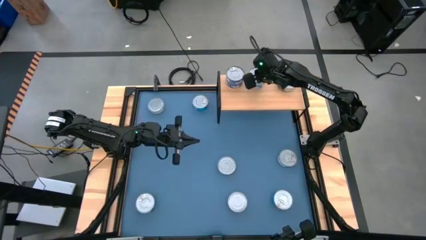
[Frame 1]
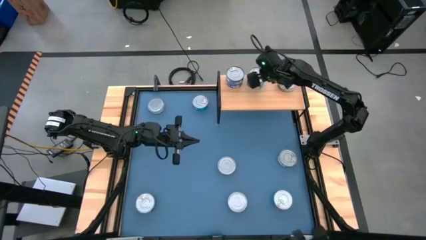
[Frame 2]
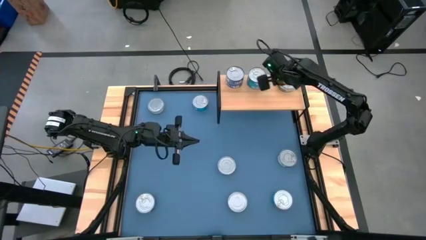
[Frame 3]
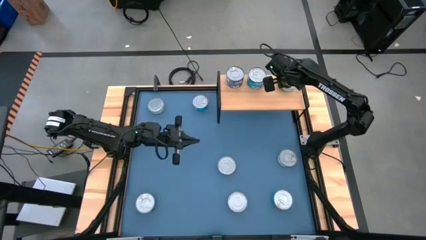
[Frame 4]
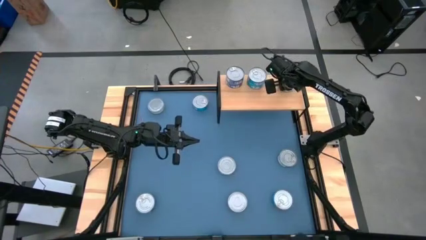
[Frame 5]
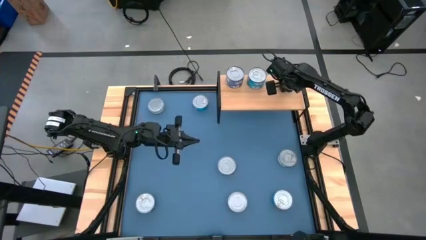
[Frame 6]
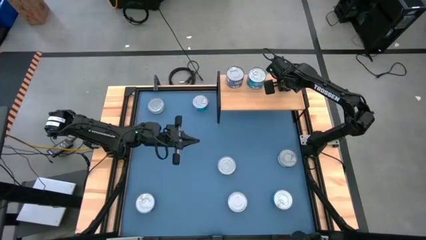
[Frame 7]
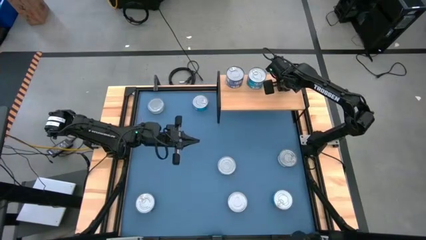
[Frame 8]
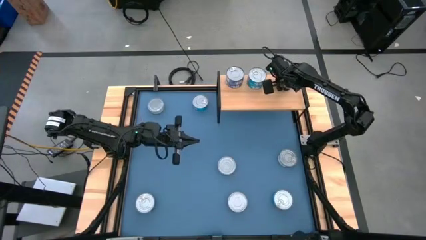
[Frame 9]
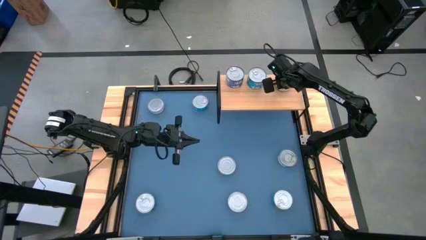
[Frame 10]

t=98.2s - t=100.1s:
Task: Stack canned seafood by type on shelf
Adjust the green tuna can on the shelf

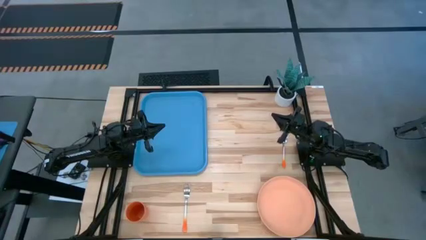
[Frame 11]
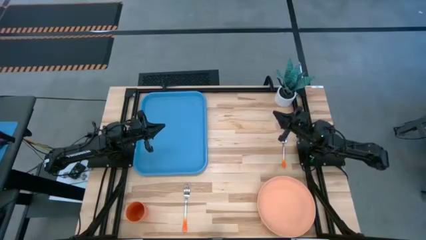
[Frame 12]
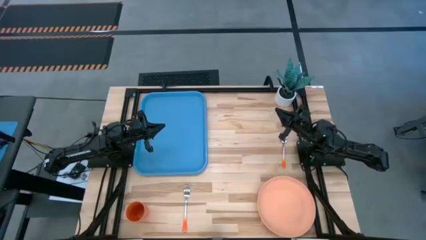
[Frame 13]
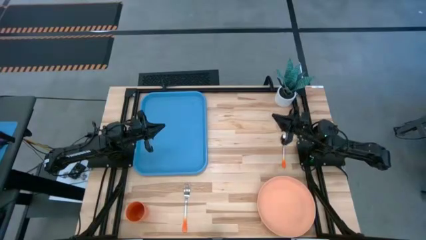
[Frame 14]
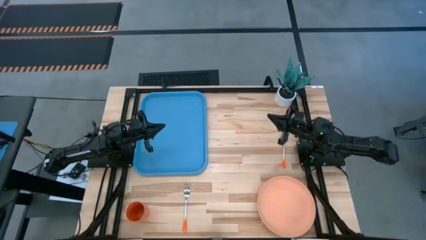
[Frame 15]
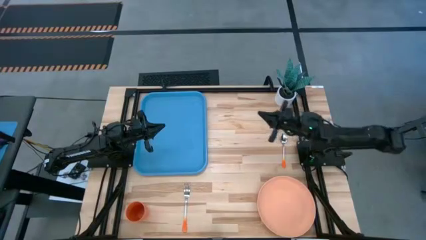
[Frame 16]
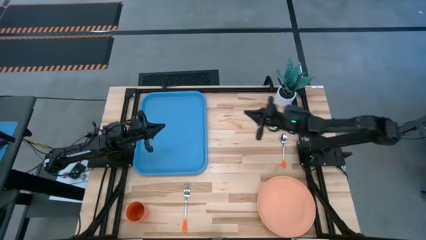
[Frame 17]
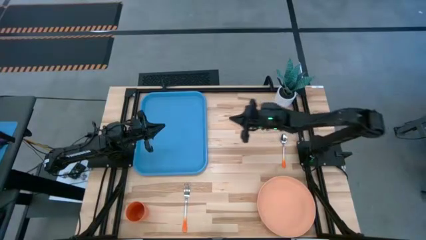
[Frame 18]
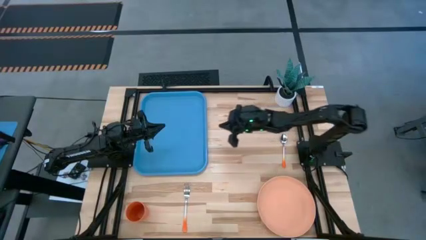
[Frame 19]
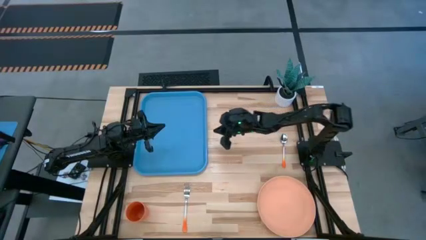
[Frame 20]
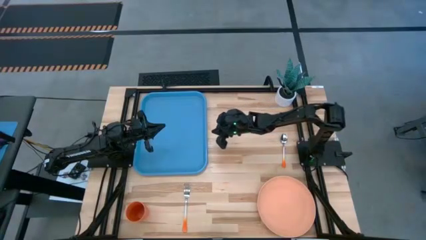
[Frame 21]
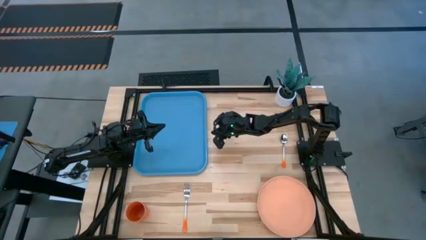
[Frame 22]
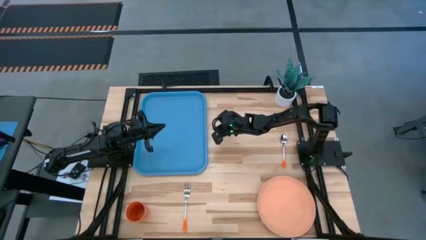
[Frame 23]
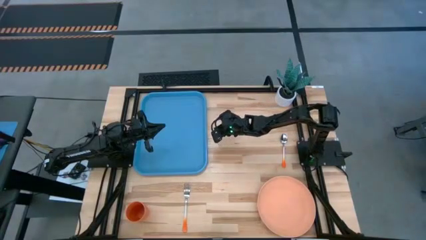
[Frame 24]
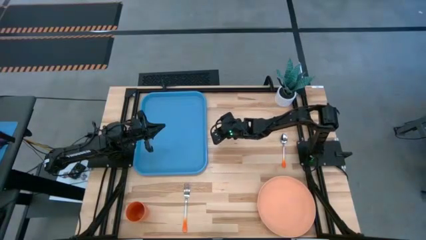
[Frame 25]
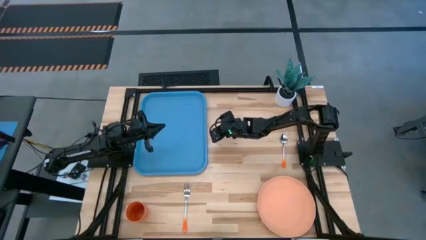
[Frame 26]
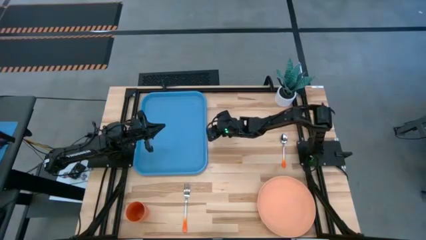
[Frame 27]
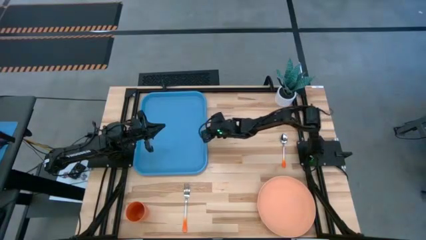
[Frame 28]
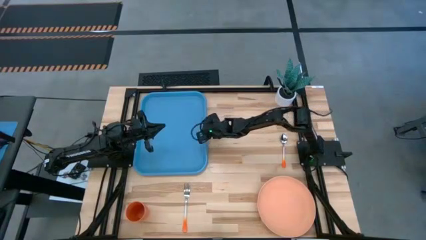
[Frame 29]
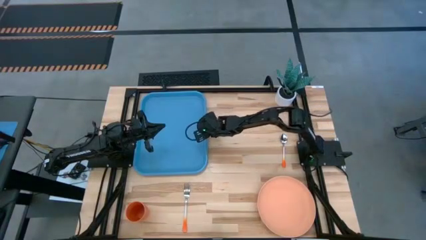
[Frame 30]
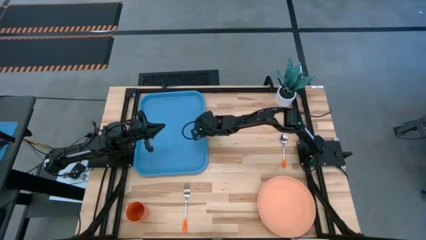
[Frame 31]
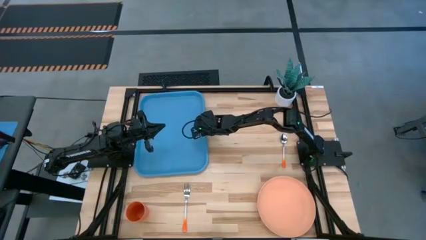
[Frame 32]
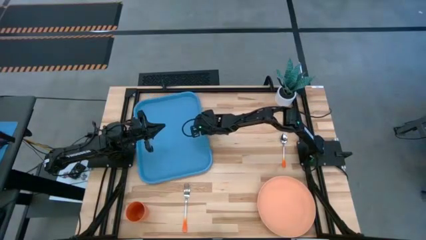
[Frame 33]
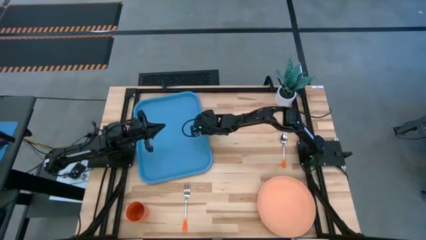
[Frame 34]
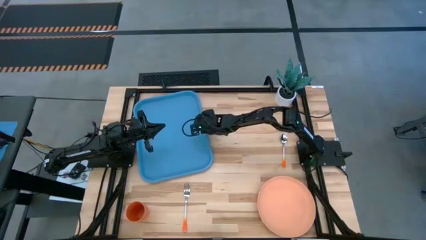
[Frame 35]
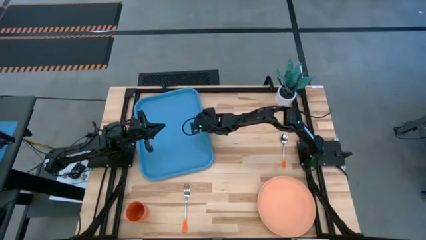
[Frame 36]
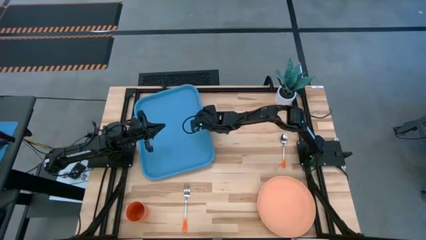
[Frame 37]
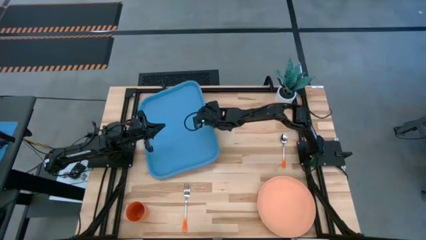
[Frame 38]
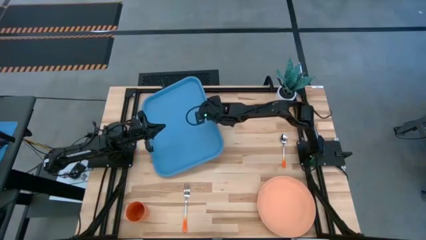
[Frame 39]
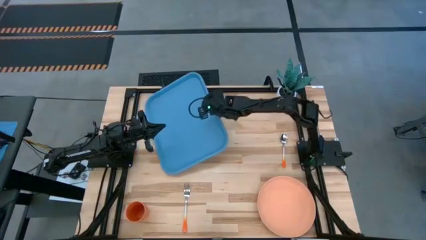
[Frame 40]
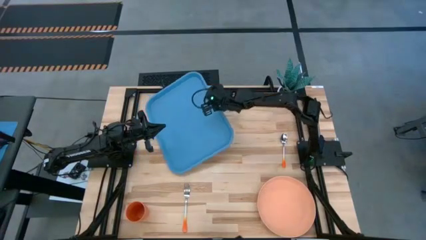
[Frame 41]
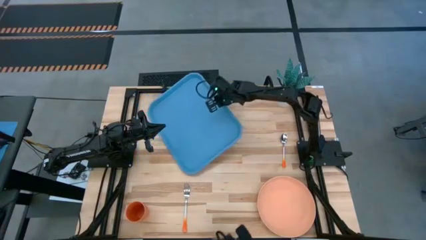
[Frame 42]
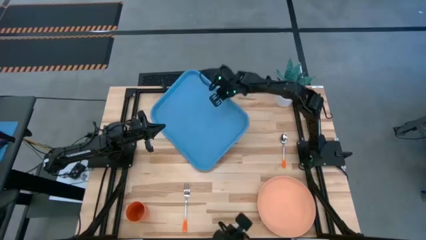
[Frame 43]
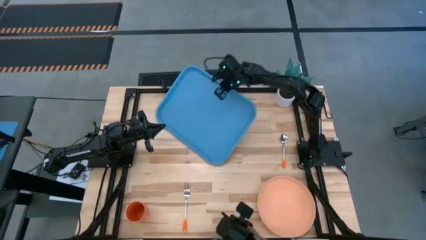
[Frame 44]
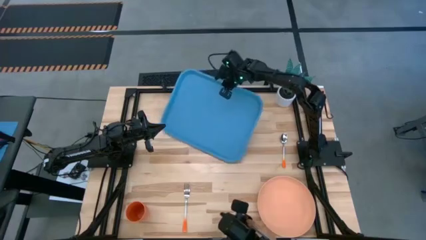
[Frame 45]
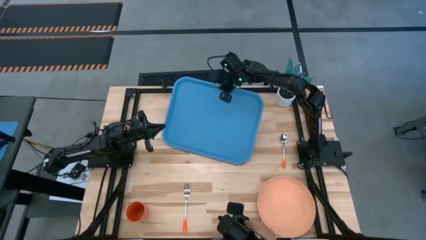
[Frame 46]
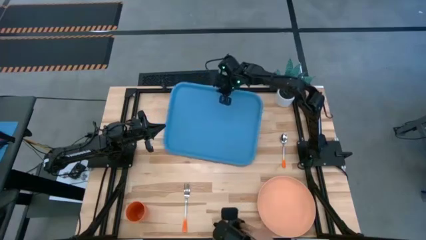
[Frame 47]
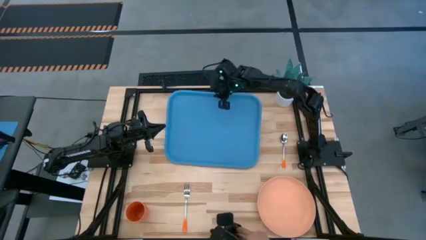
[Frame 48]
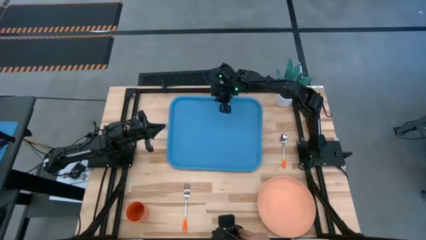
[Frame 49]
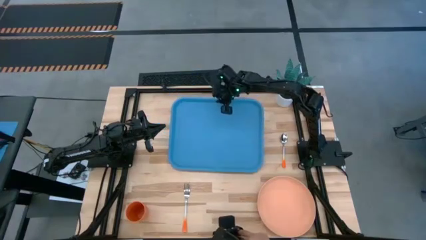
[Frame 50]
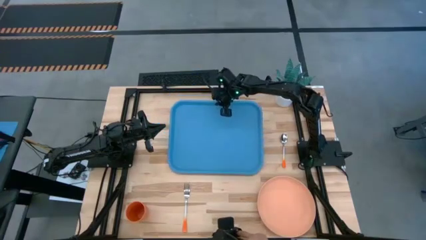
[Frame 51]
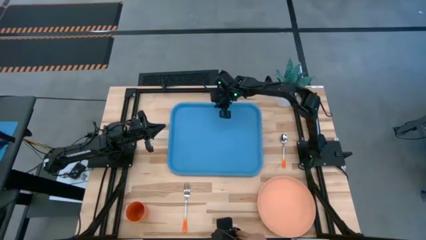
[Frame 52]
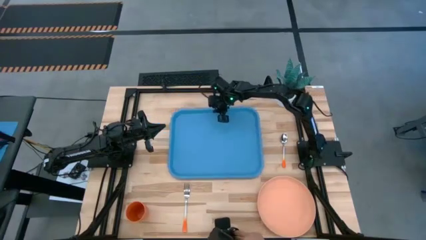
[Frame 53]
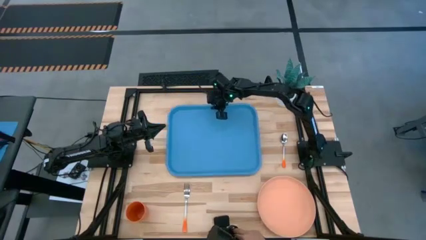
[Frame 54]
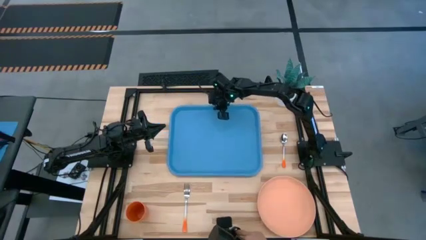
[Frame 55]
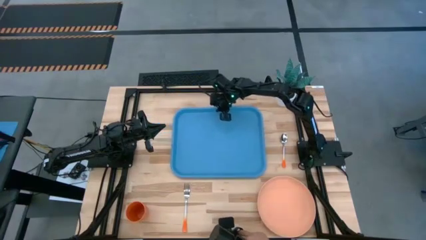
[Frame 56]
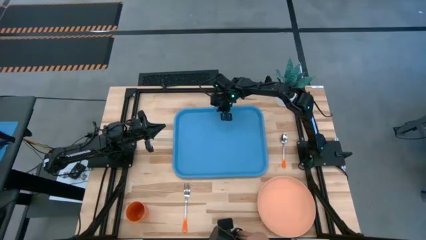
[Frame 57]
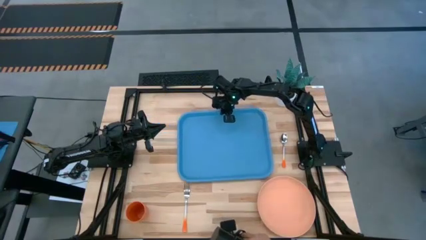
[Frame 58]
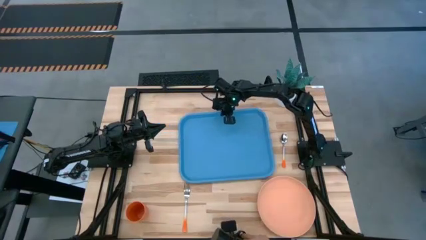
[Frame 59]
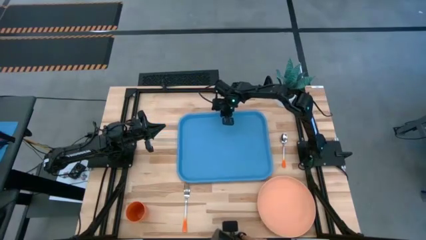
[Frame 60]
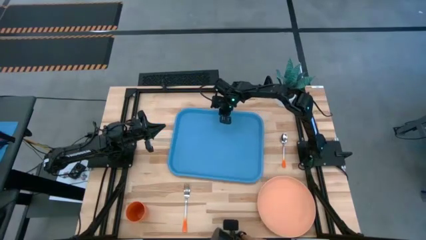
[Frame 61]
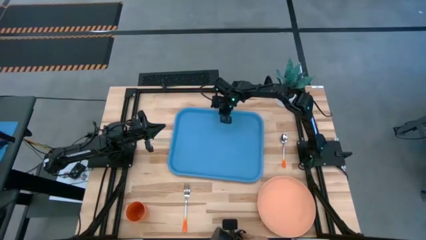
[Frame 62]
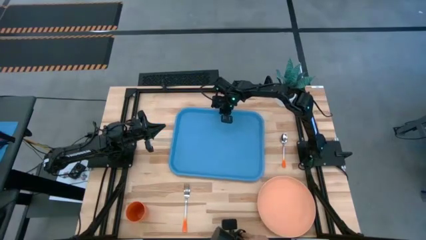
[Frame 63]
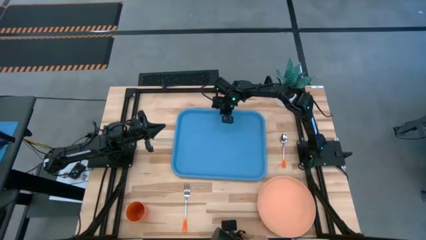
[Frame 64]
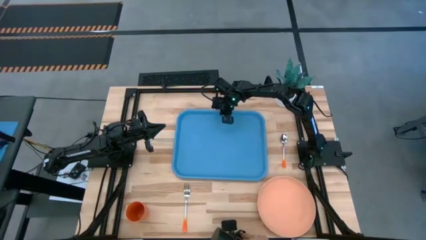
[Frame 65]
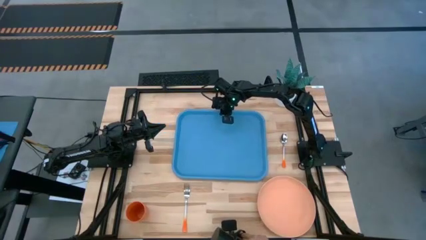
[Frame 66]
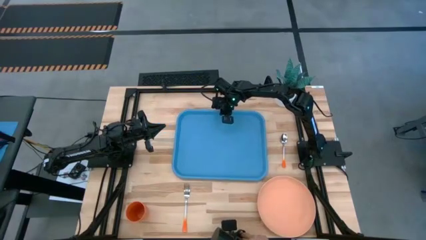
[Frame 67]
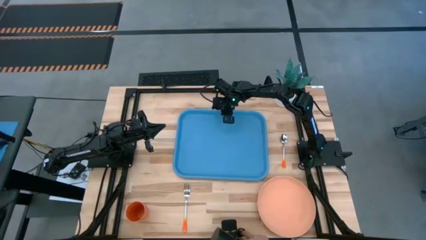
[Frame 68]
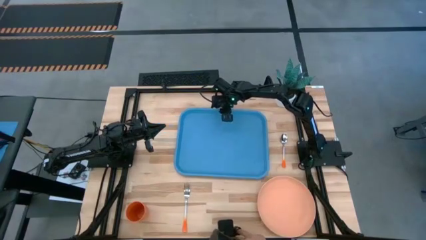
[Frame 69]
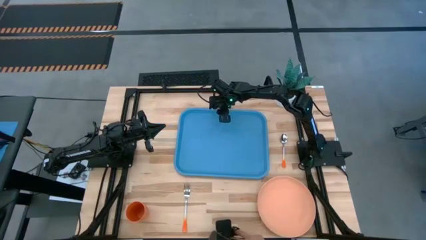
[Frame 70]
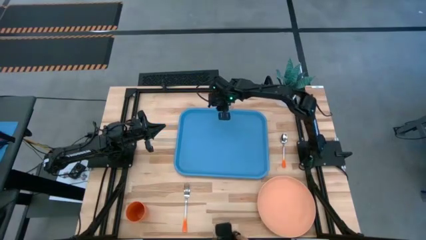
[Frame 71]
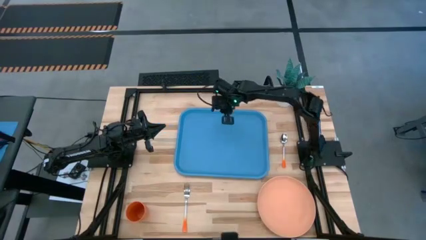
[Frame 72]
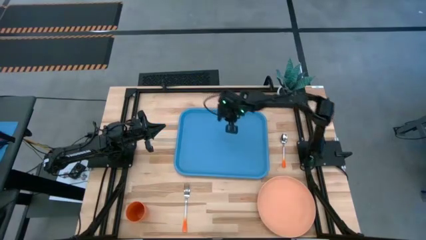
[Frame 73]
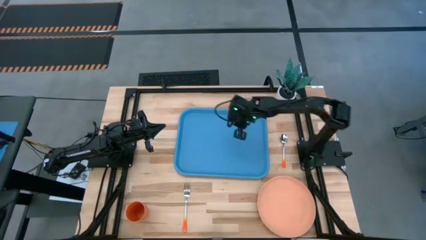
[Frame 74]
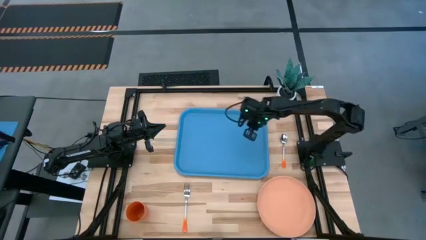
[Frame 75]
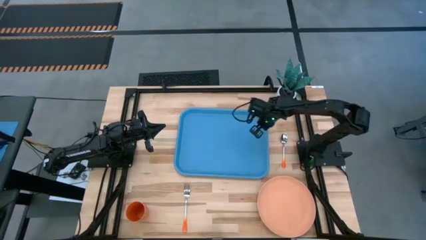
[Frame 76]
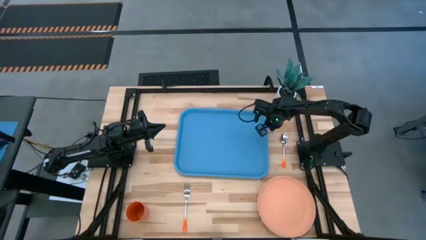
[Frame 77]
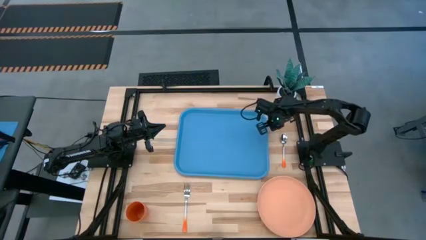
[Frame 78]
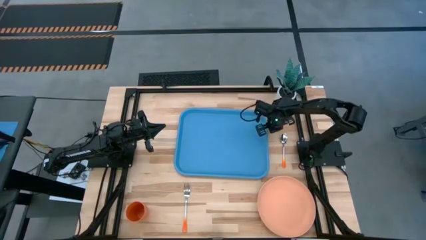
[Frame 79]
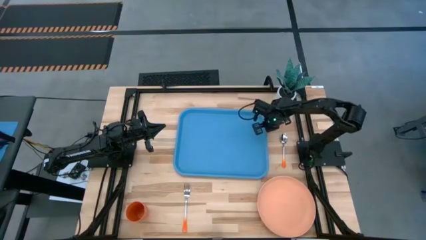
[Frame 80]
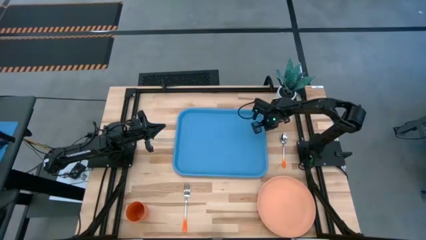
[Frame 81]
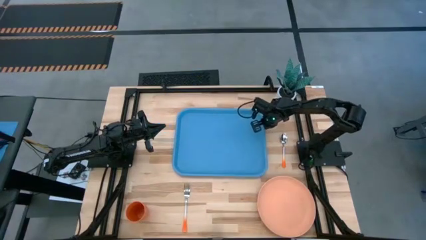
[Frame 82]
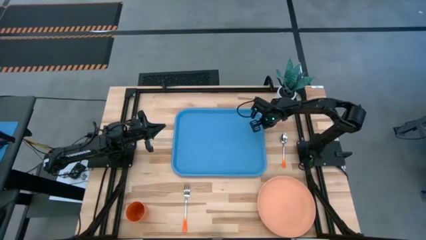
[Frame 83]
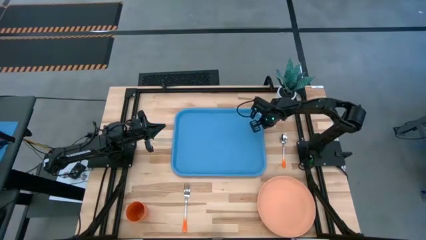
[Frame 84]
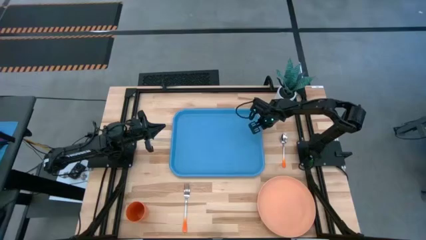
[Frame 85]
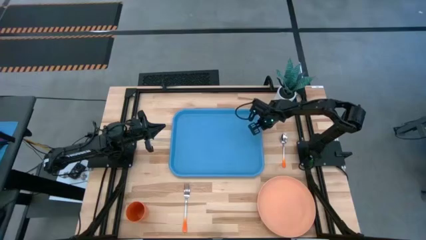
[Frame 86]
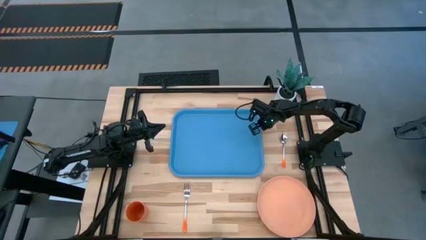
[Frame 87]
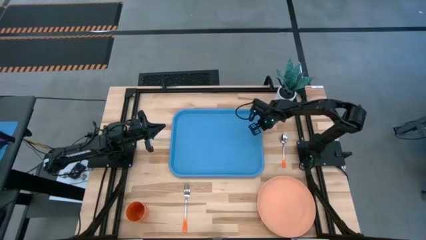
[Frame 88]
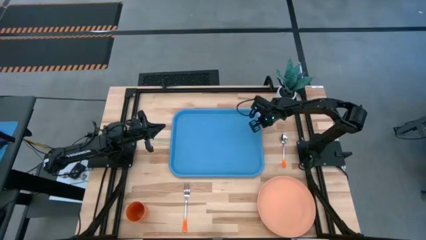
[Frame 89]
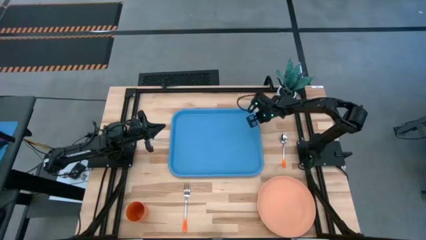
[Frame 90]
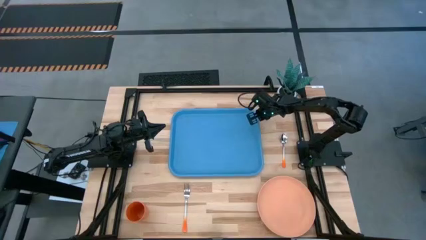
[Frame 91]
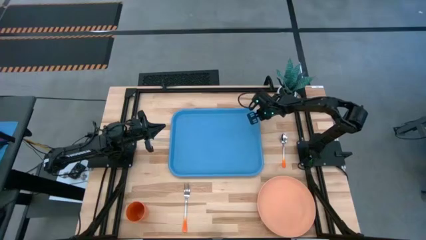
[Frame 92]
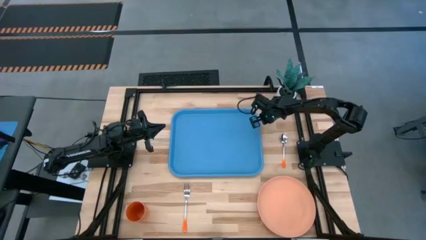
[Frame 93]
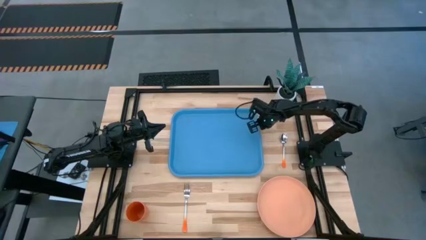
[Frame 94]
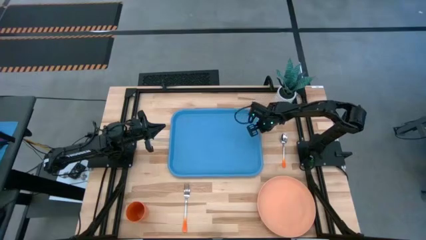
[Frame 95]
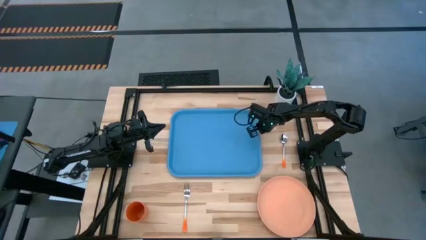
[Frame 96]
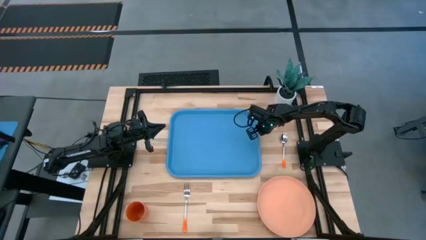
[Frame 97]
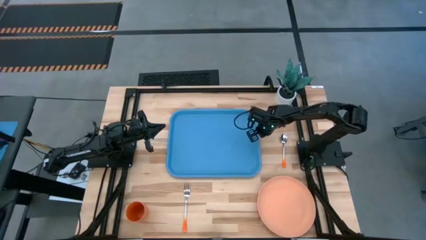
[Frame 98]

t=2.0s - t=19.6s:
Task: Pick and place plate/cup/fork/spoon on tray
Move the blue tray to the center of the table
